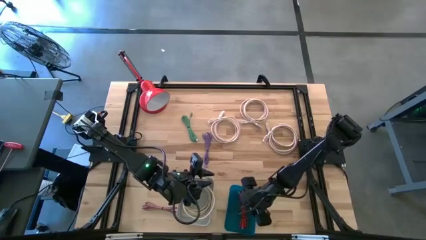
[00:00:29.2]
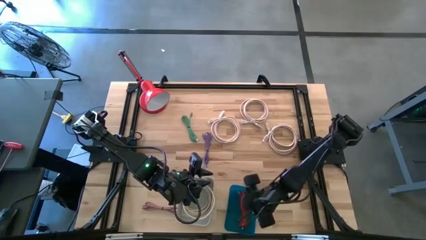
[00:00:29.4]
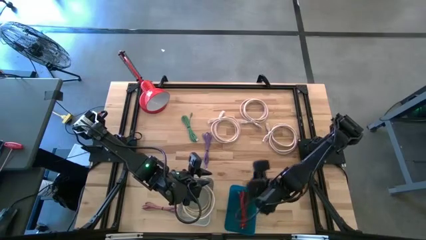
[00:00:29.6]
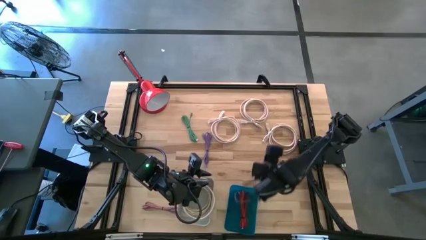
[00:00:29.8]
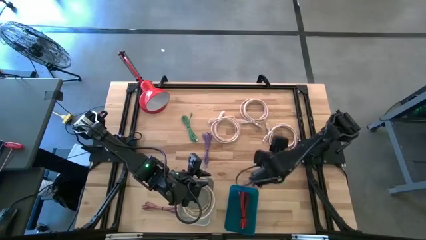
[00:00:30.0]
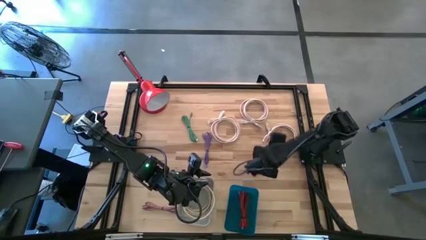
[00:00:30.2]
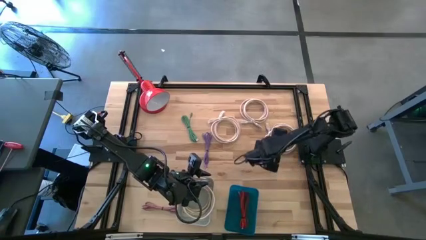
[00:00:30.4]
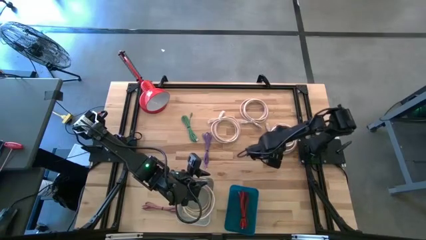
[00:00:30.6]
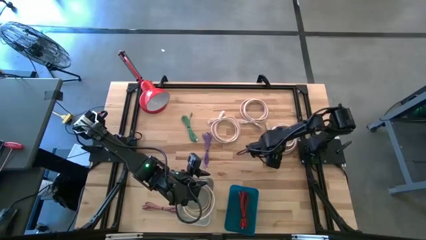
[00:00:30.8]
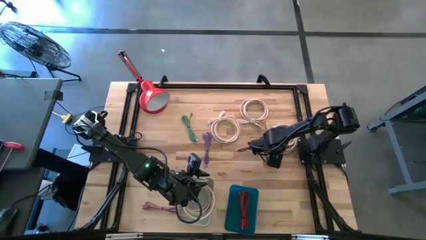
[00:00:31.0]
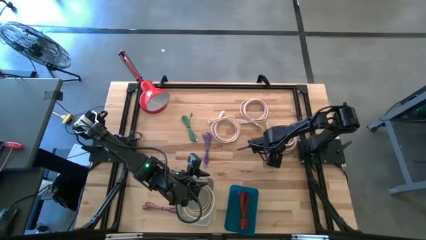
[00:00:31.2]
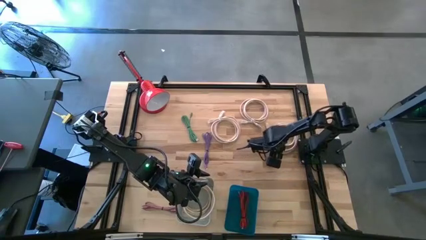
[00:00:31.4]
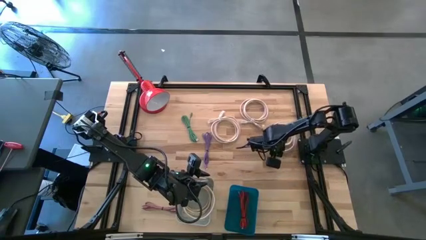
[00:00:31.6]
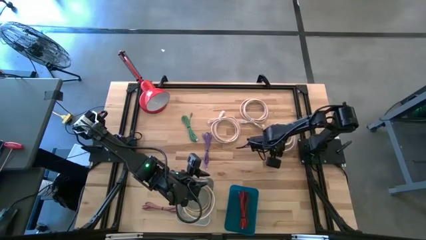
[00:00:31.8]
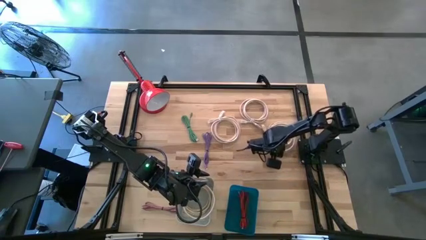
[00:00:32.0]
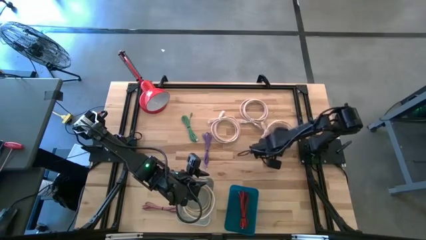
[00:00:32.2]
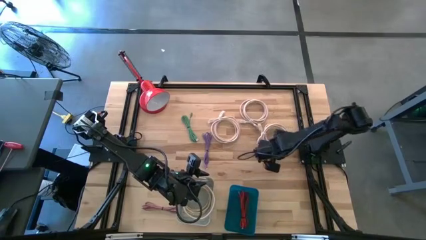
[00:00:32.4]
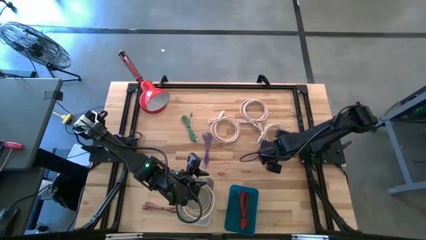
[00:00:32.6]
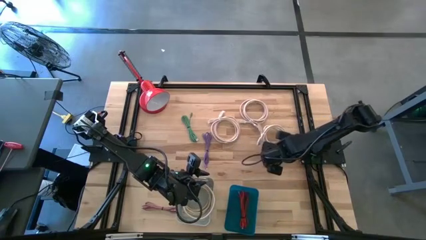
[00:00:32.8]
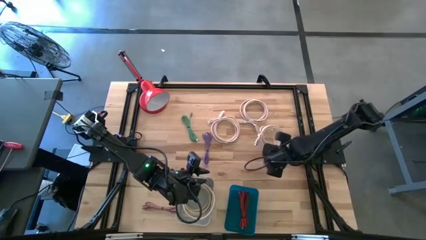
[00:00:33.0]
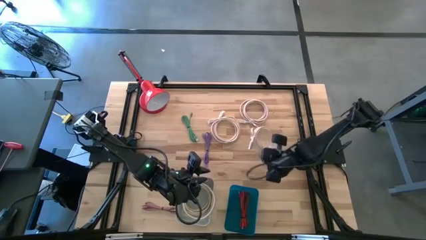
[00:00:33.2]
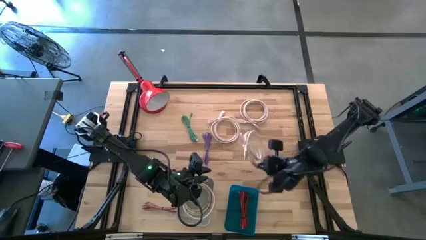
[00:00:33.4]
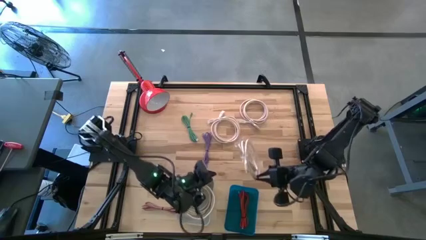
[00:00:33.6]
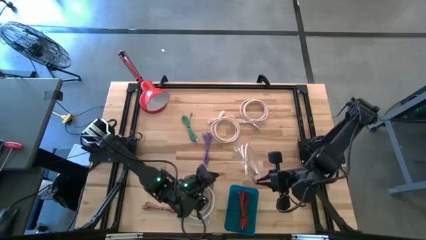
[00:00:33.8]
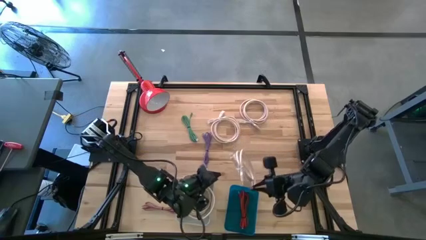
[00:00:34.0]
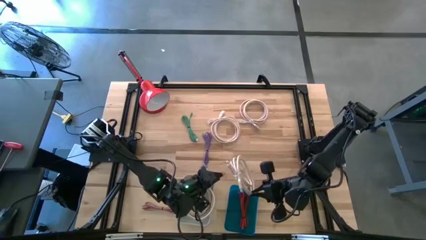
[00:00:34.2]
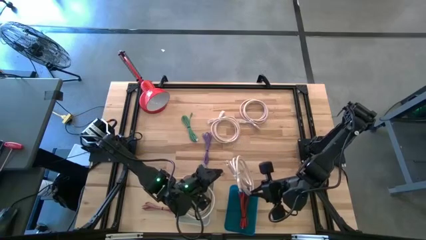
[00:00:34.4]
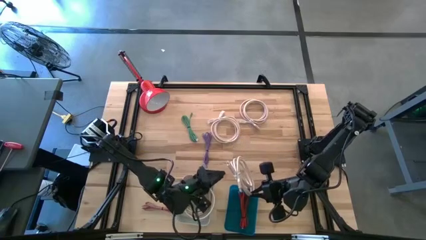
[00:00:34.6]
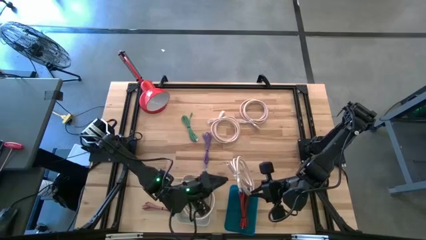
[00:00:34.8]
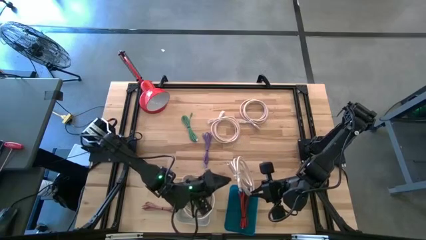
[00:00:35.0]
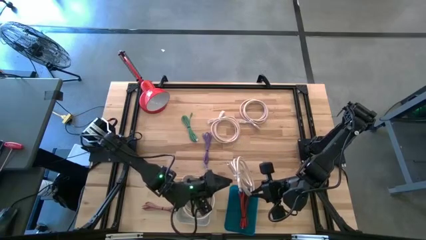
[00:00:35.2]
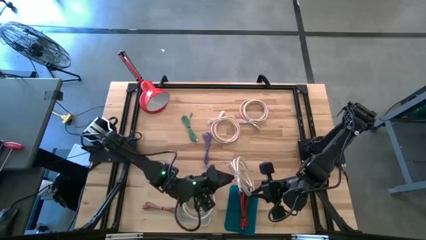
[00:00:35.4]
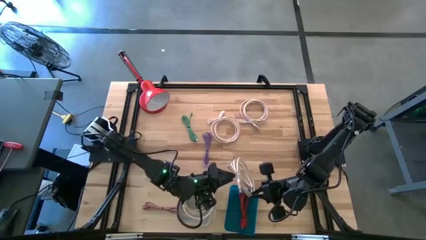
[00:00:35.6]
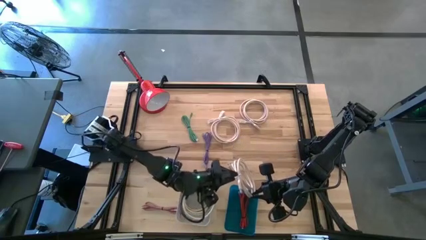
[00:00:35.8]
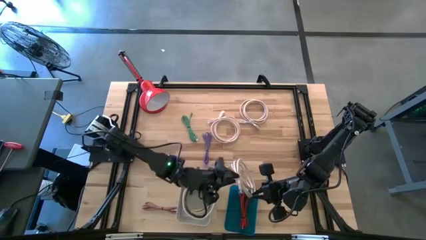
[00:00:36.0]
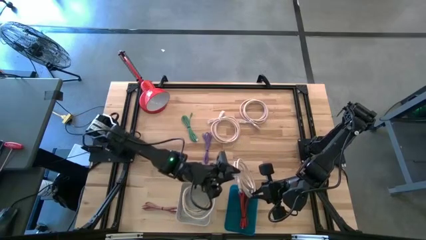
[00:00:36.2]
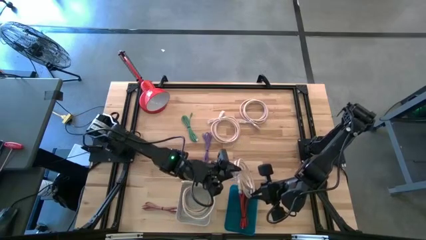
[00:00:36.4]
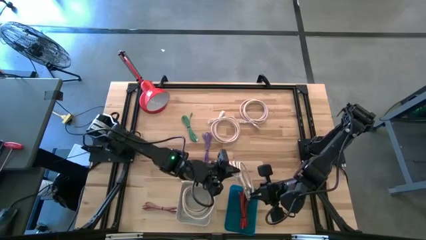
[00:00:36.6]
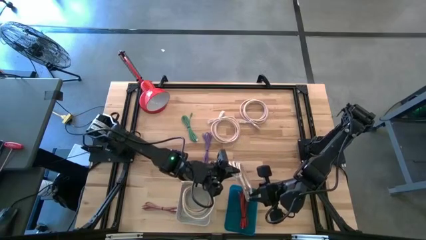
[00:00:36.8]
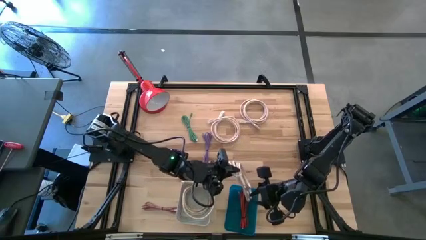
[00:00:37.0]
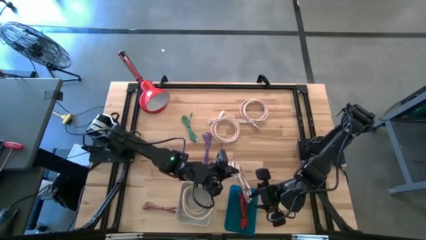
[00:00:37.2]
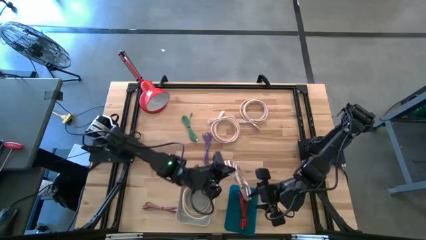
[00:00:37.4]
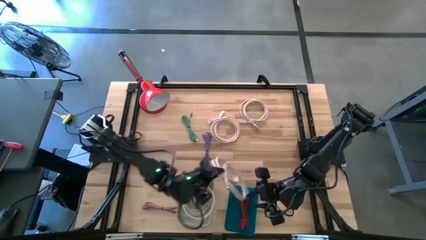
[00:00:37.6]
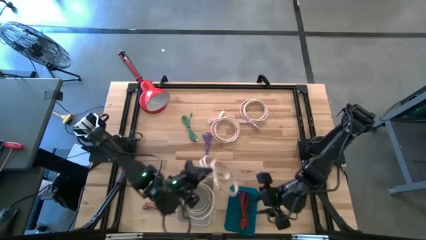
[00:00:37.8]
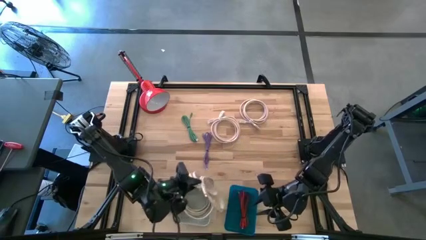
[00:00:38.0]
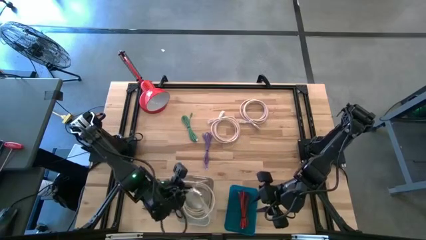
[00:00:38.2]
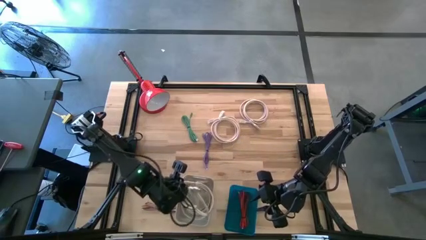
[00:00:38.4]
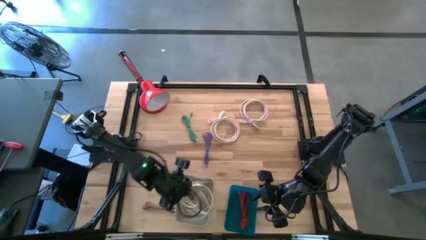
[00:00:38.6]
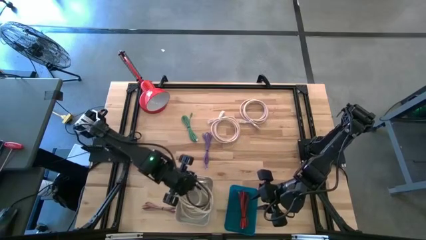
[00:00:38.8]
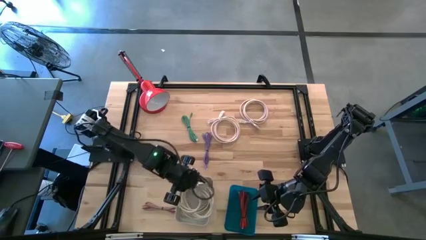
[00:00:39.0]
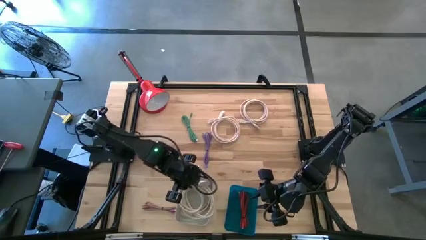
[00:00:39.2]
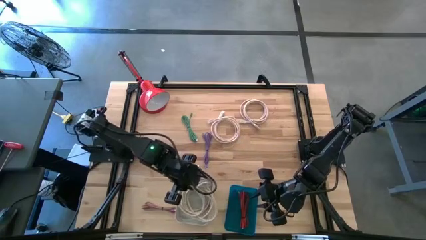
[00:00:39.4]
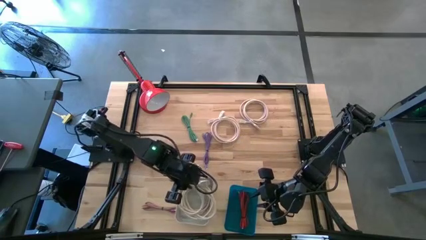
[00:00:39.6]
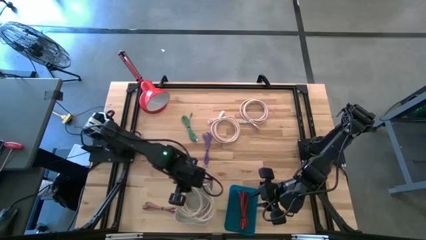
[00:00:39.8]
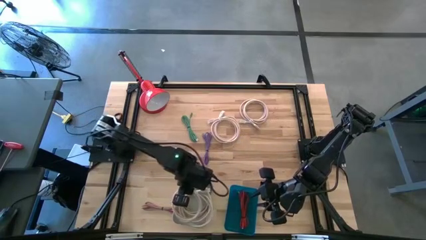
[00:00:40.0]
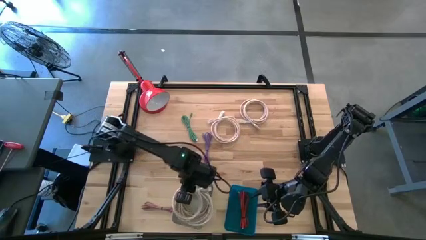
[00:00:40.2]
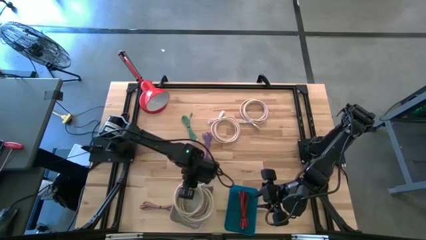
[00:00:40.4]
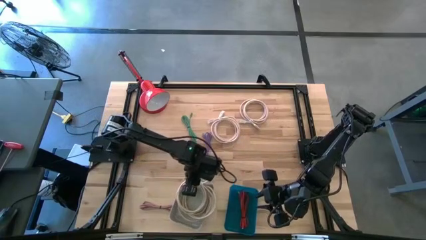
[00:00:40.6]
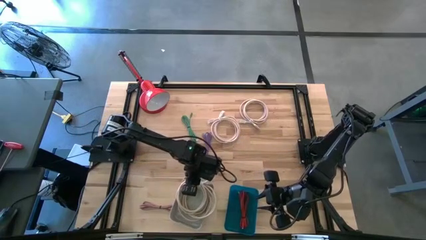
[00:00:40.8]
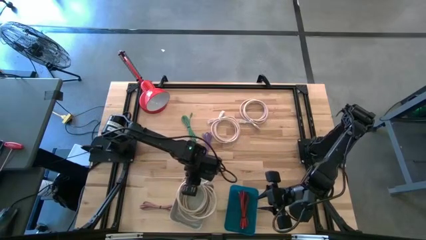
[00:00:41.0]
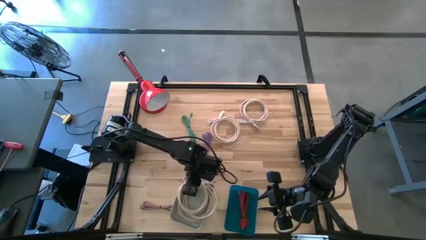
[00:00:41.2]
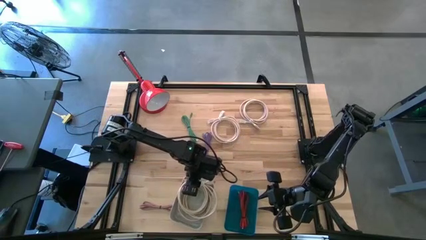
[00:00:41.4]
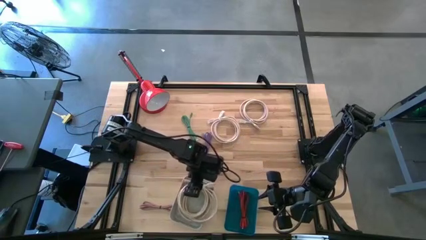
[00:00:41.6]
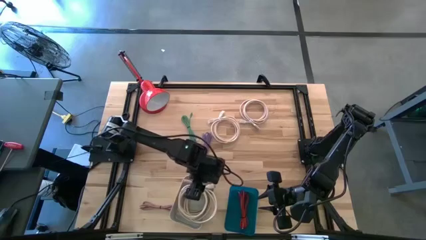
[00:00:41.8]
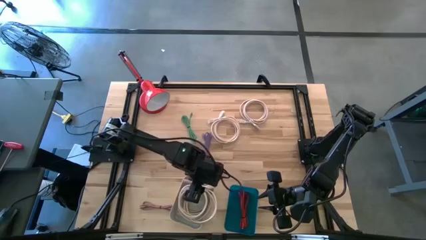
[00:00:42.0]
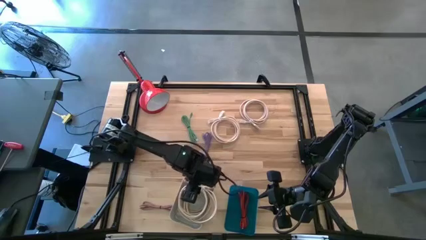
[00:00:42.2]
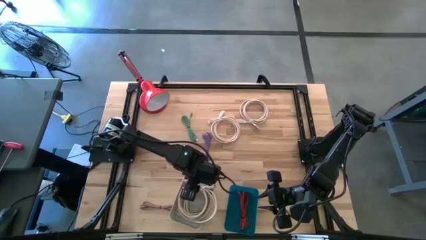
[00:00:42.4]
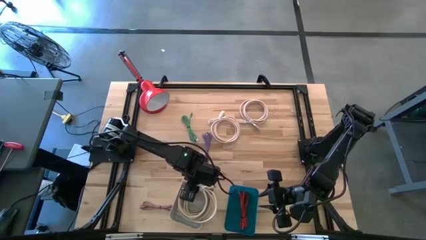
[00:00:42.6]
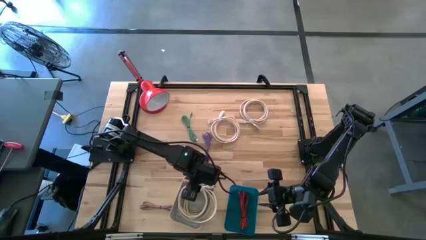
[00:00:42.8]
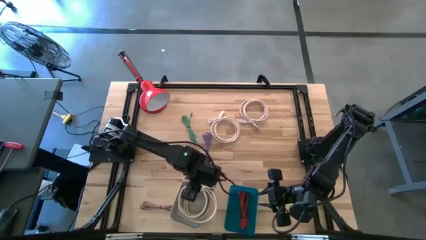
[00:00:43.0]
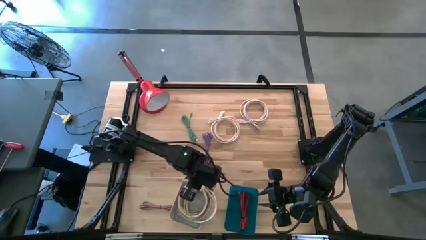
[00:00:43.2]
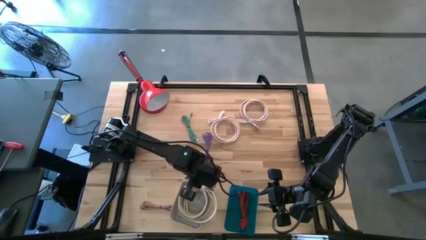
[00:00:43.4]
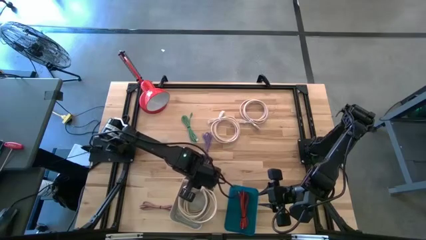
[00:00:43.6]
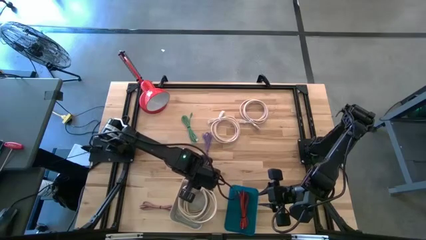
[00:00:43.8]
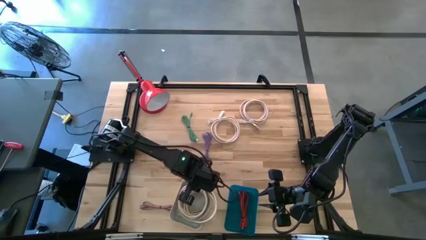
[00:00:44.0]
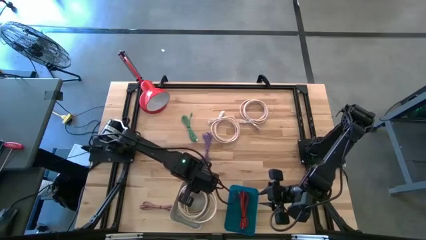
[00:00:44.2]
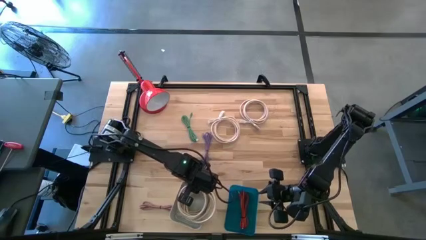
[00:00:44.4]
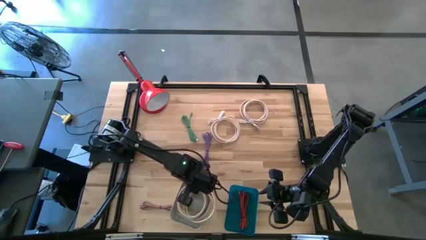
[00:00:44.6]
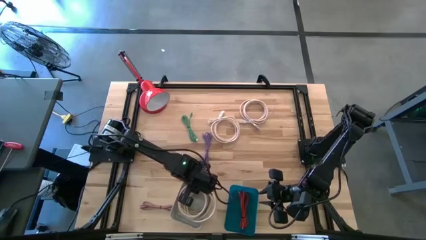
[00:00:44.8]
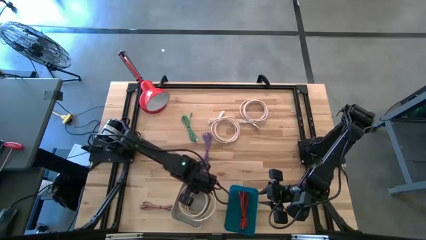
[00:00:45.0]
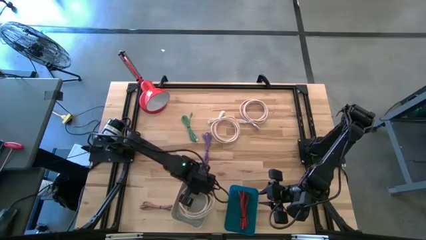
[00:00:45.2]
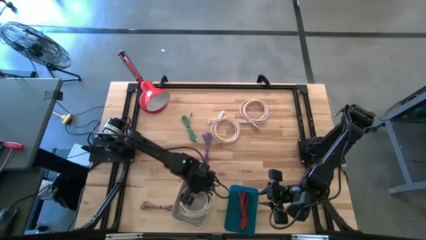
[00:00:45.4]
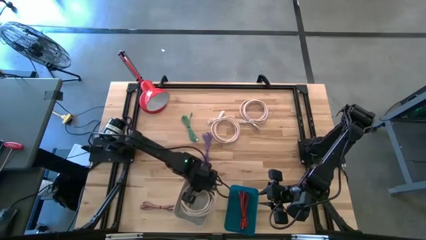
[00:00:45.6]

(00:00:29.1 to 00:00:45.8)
Task: Pick & Place USB Port
Put the light brown HDMI cable into the white bin
